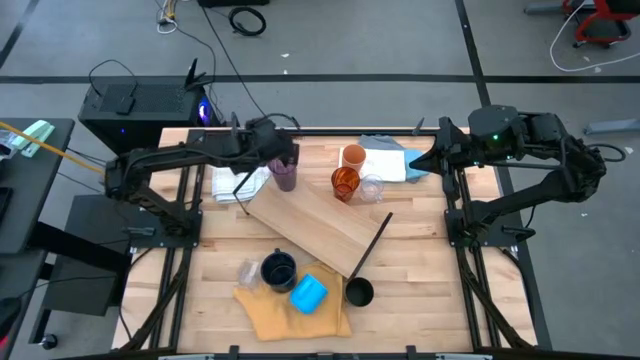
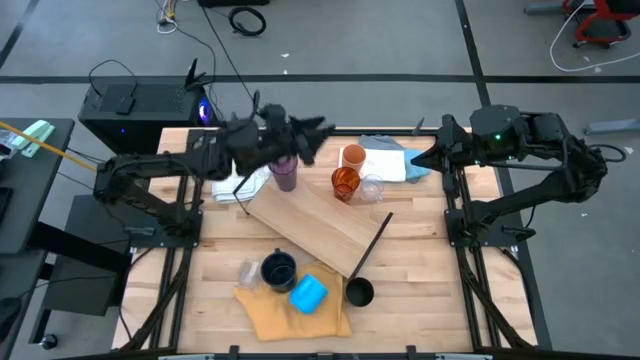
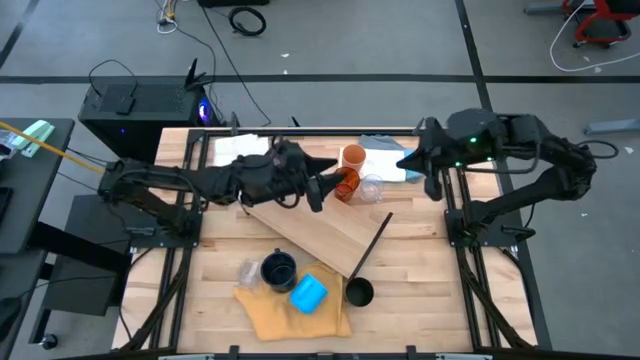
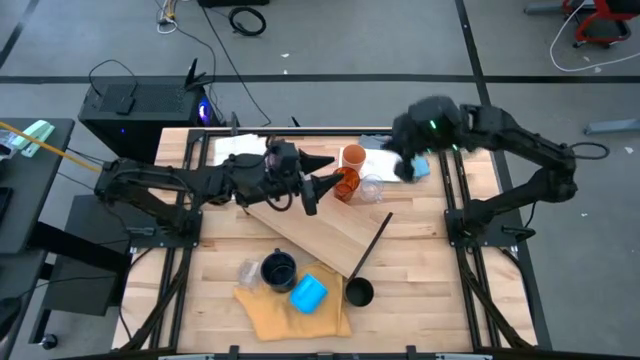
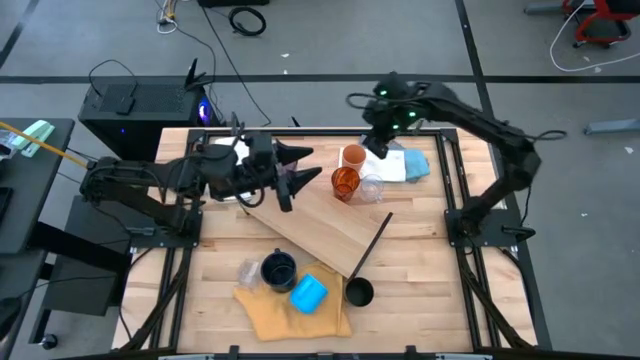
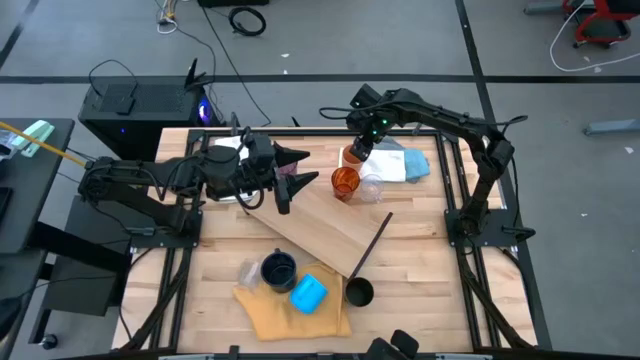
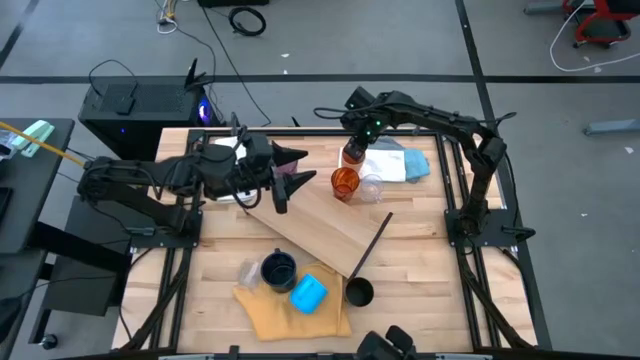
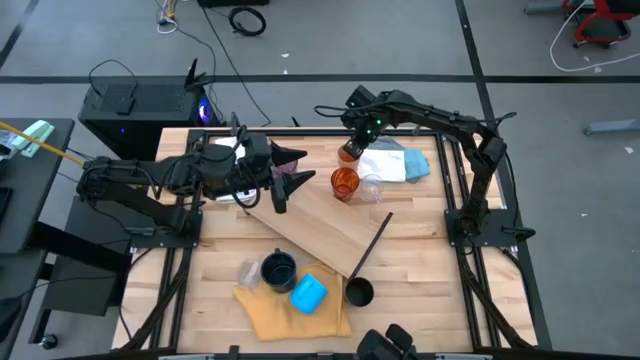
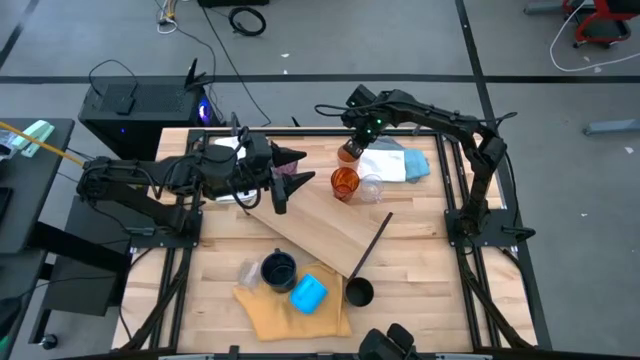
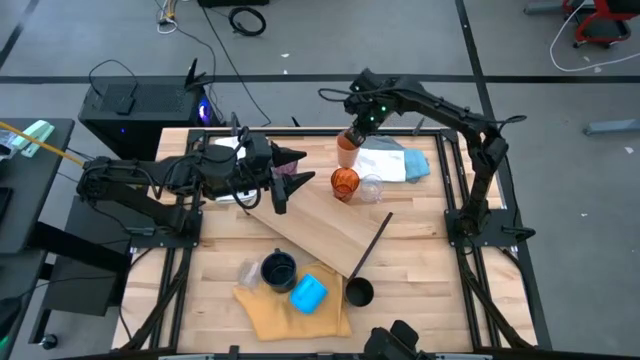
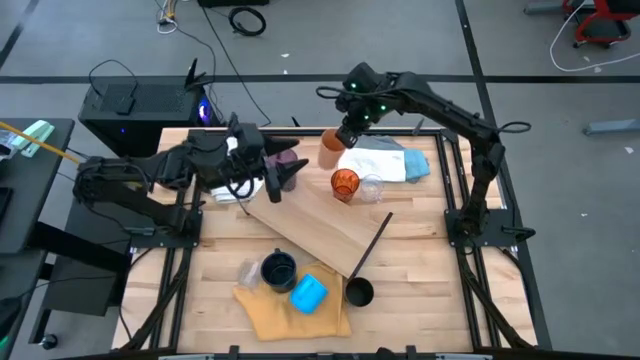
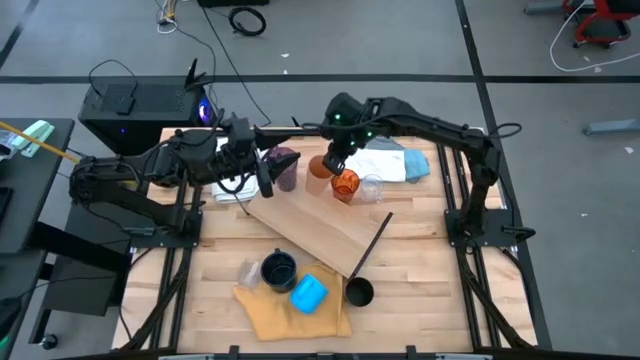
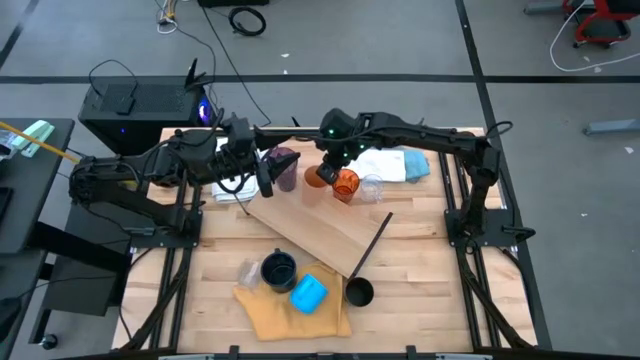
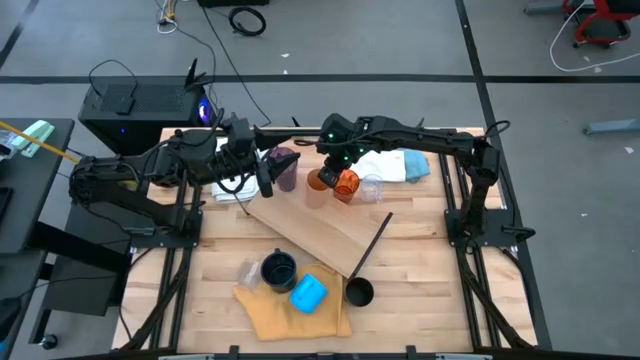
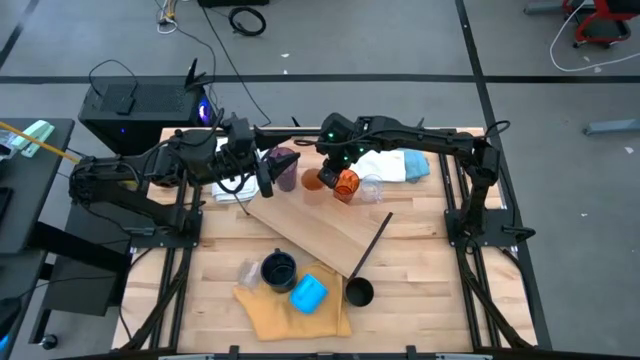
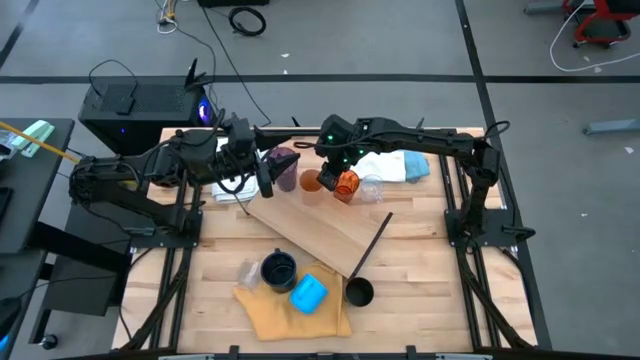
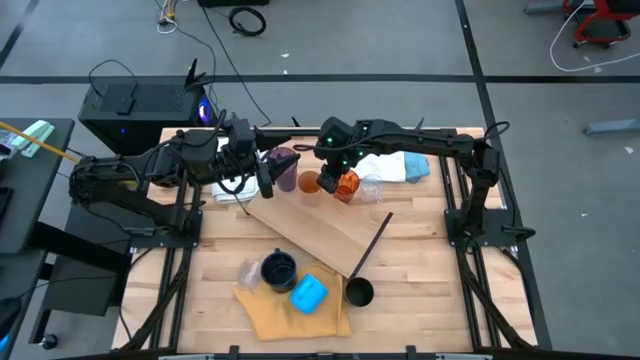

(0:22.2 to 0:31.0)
Task: Stack small to large cups/mugs on shelf
Put the orange cup on the shelf

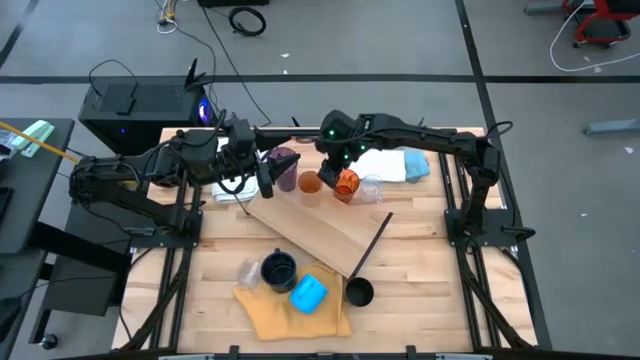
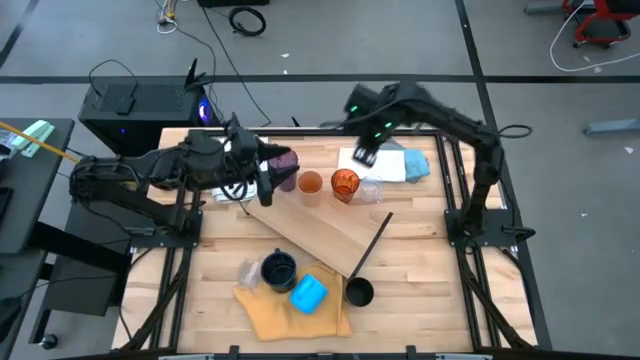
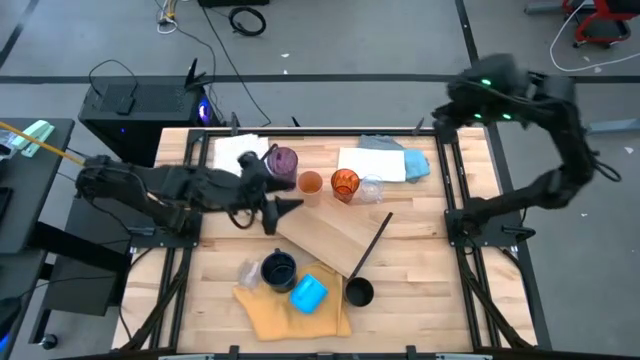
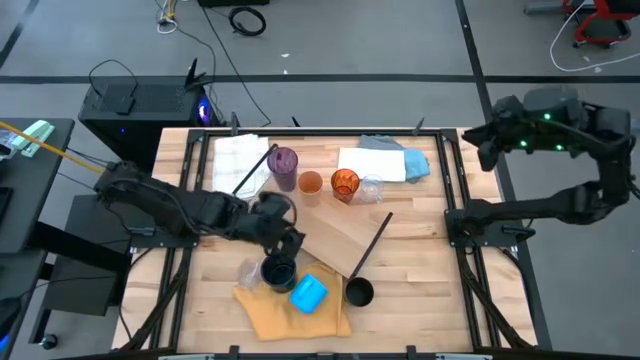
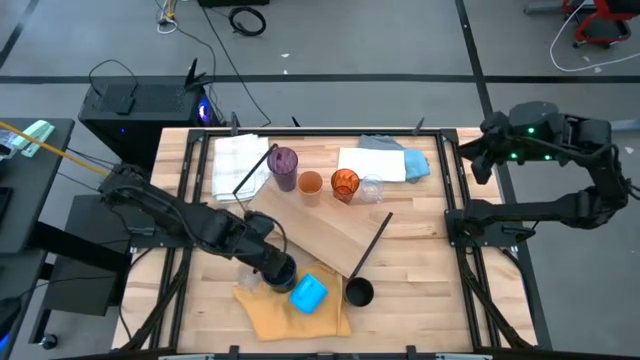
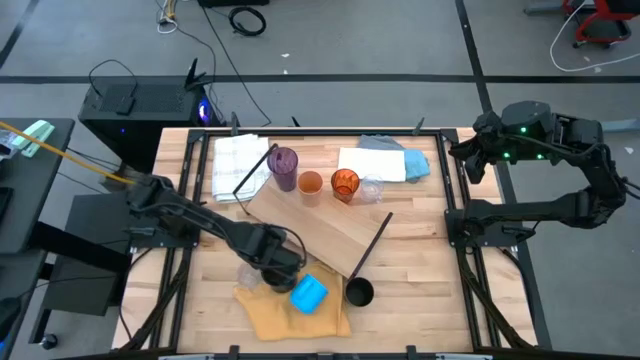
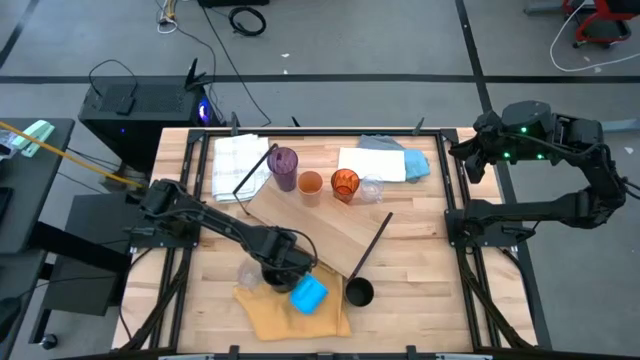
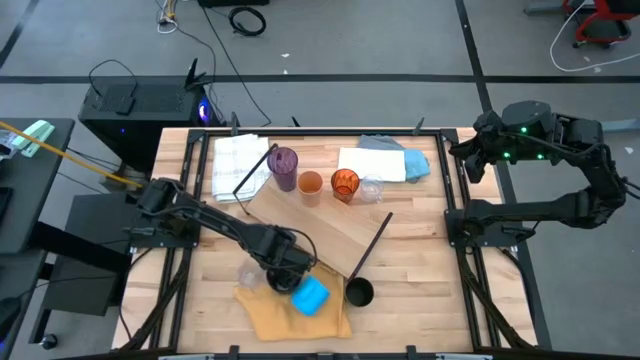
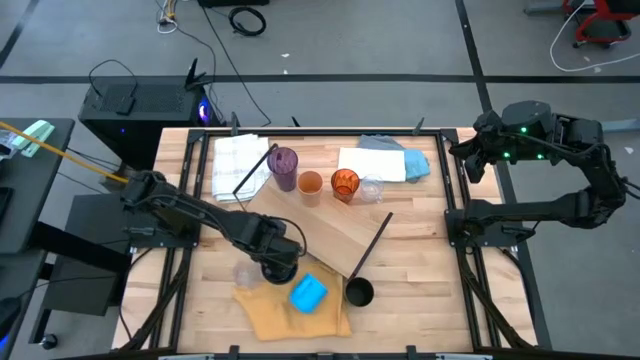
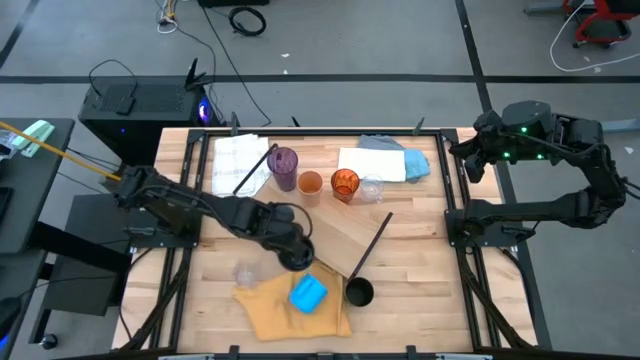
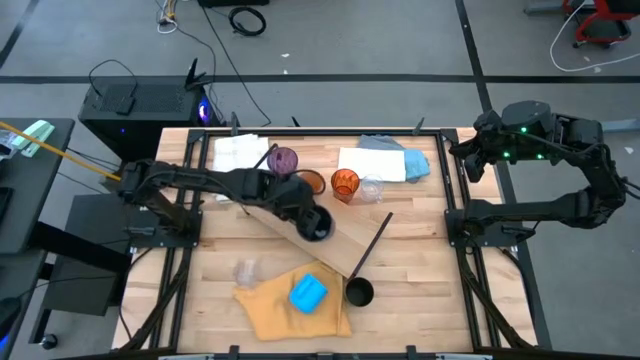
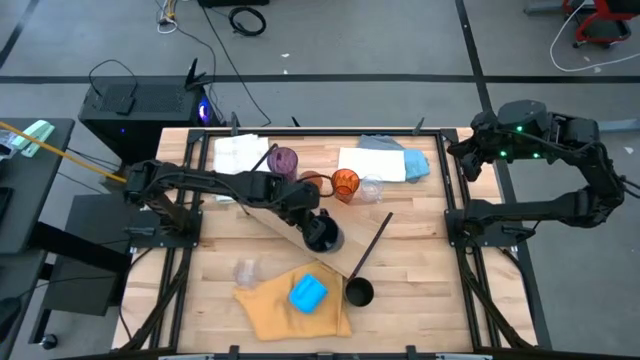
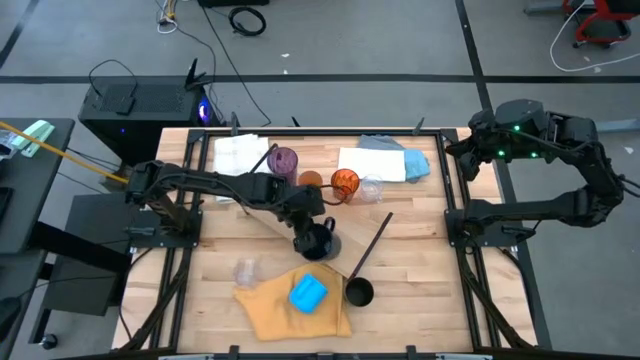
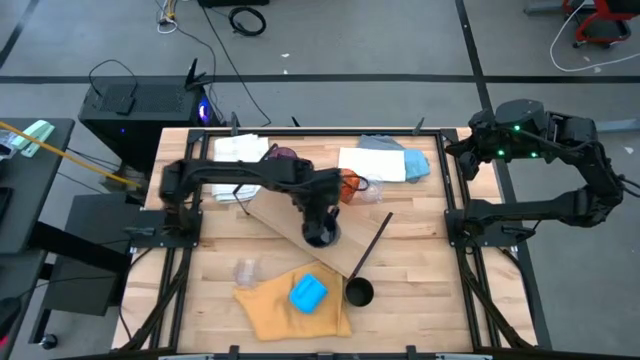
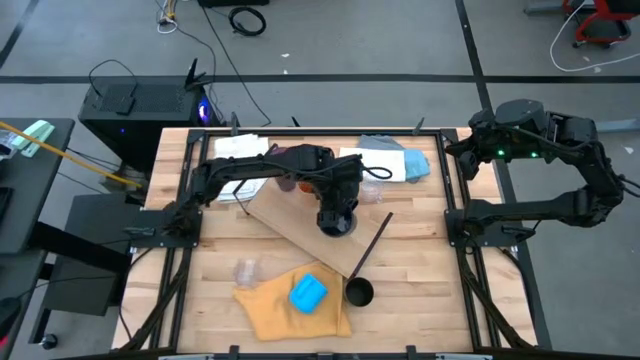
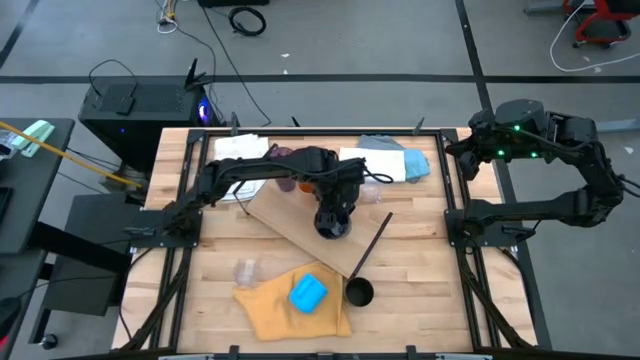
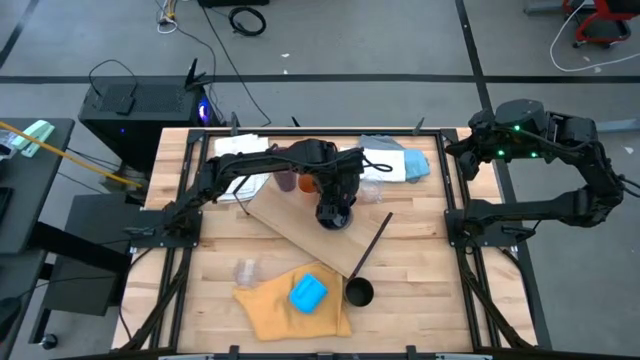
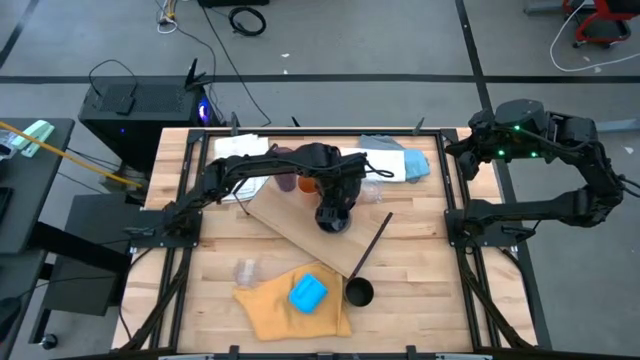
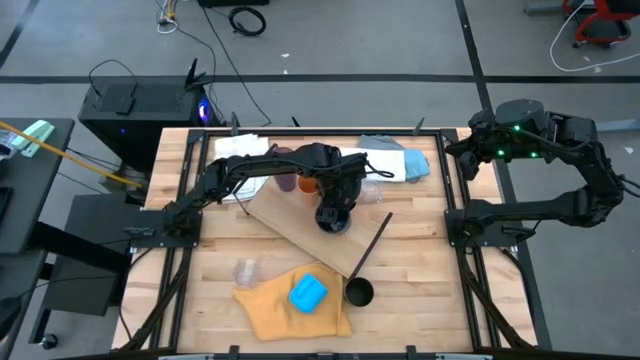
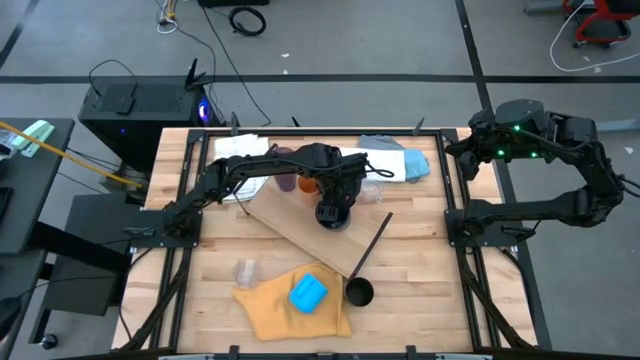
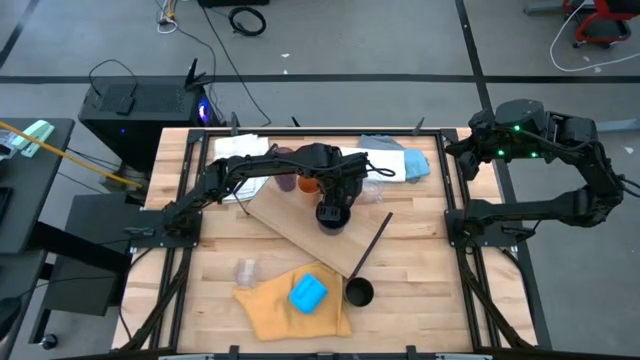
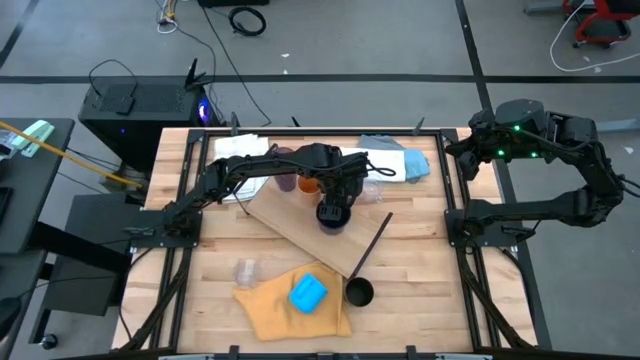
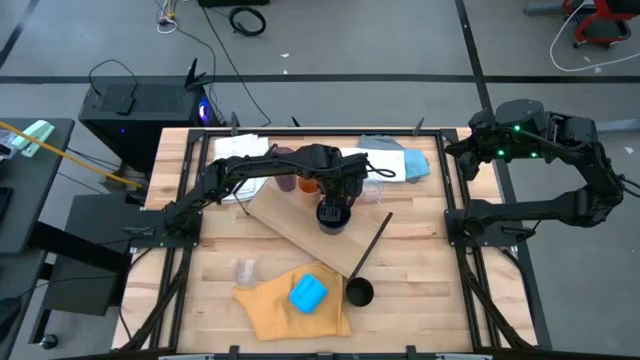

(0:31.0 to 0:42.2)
Put the dark blue mug on the shelf
